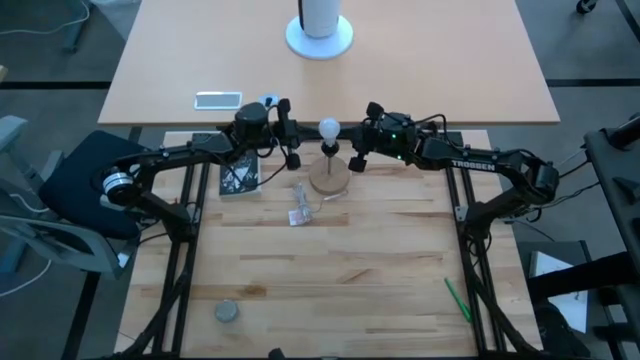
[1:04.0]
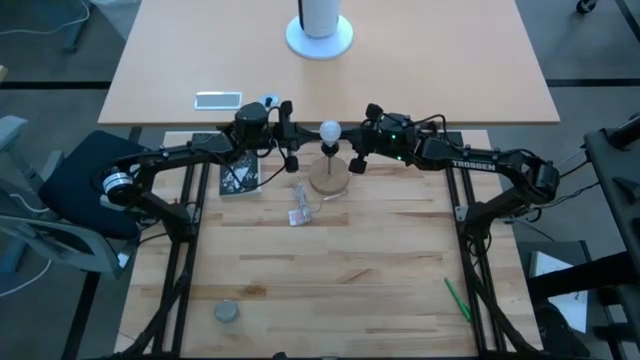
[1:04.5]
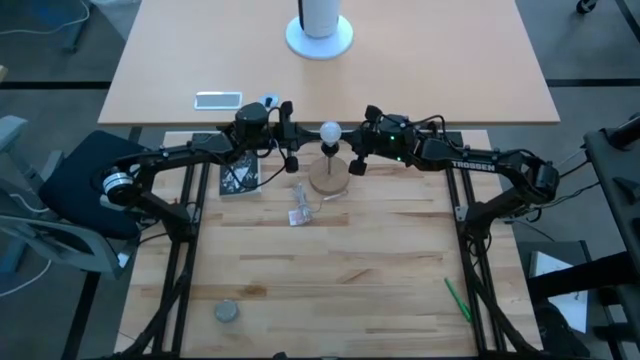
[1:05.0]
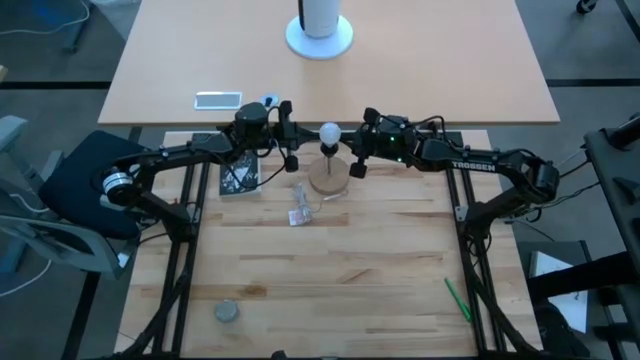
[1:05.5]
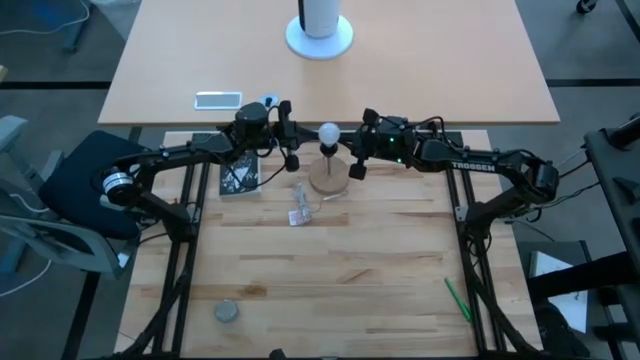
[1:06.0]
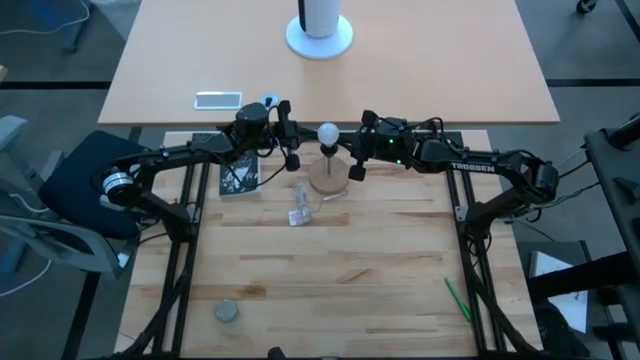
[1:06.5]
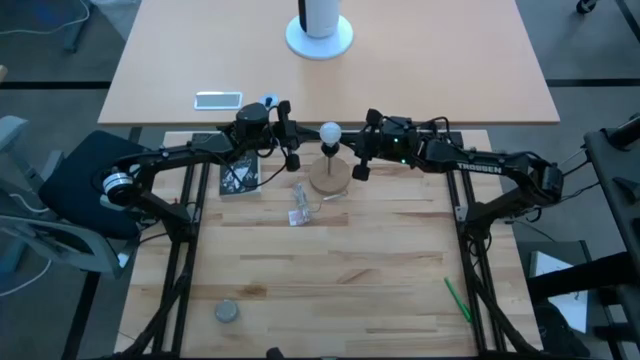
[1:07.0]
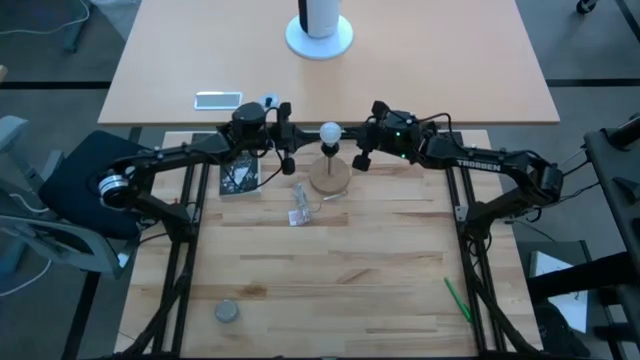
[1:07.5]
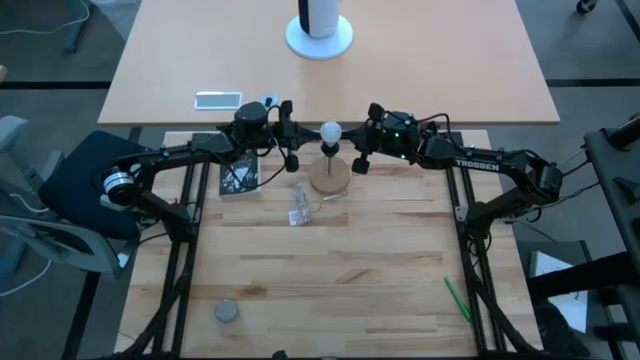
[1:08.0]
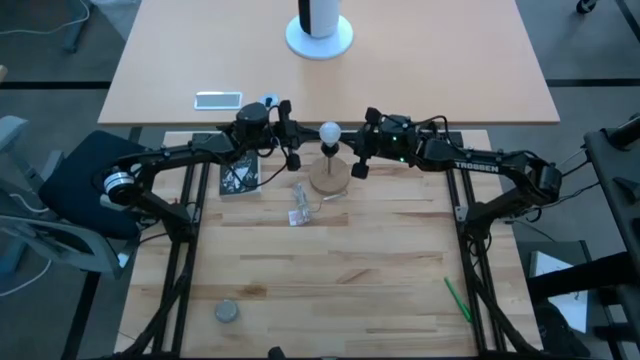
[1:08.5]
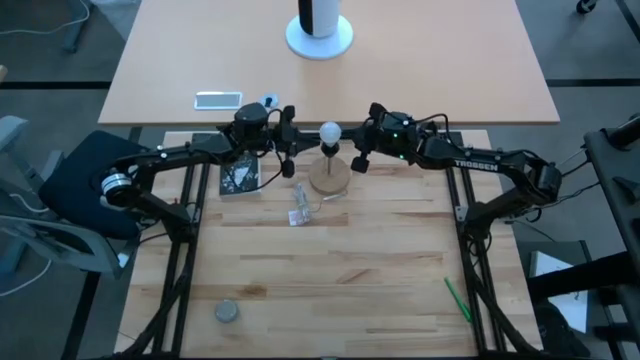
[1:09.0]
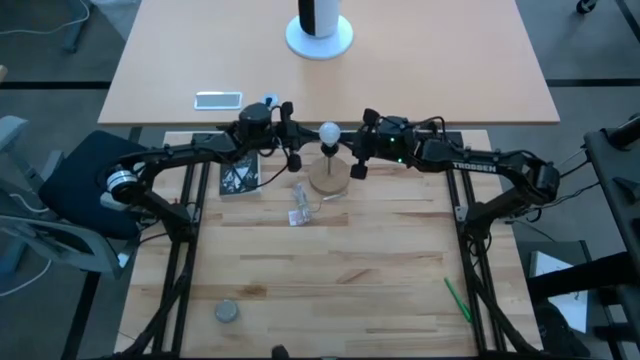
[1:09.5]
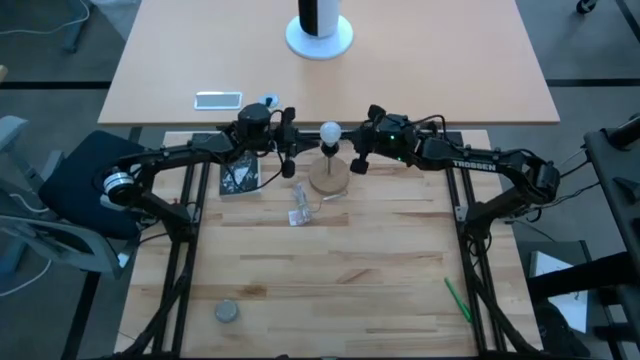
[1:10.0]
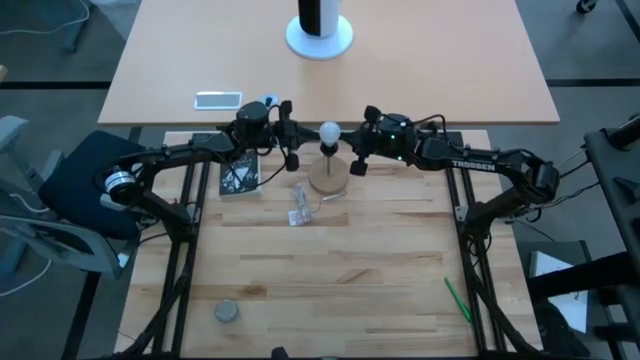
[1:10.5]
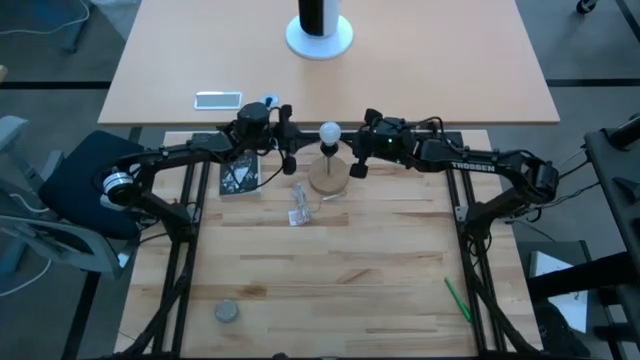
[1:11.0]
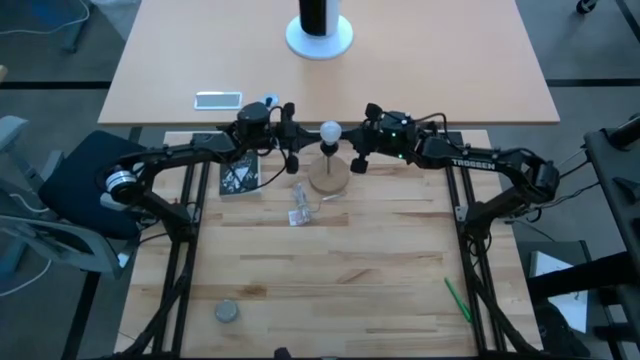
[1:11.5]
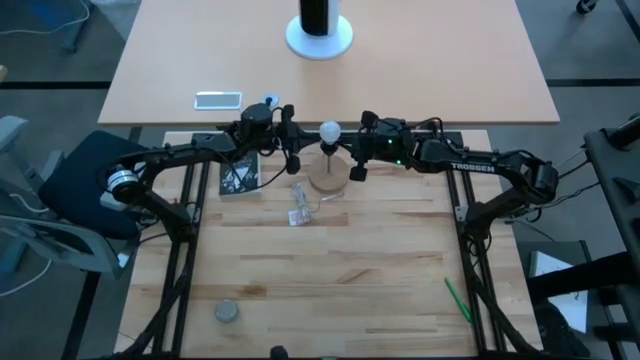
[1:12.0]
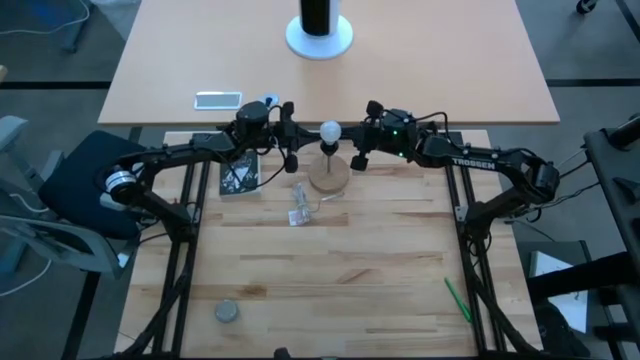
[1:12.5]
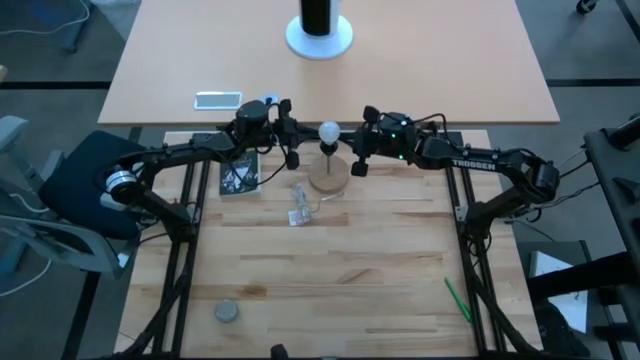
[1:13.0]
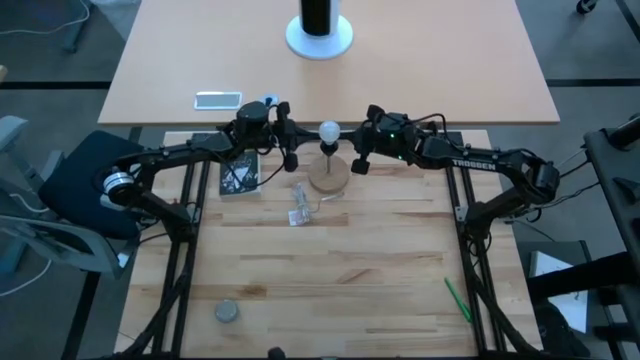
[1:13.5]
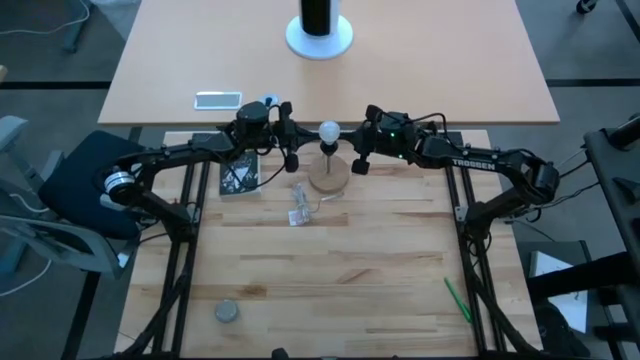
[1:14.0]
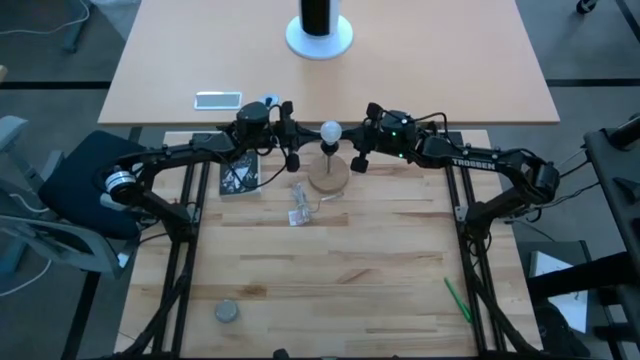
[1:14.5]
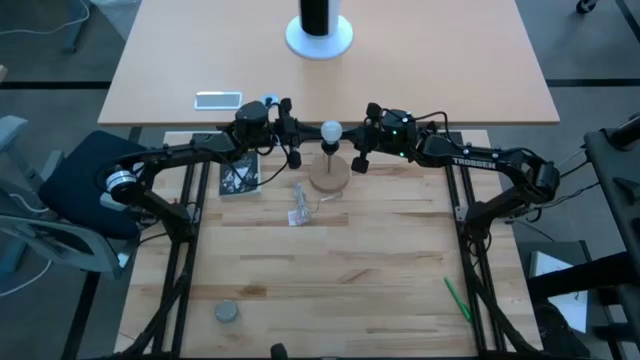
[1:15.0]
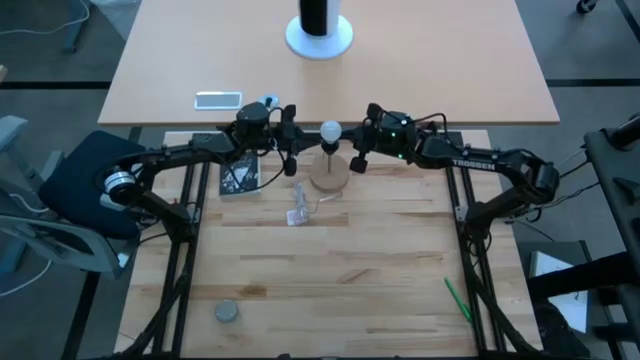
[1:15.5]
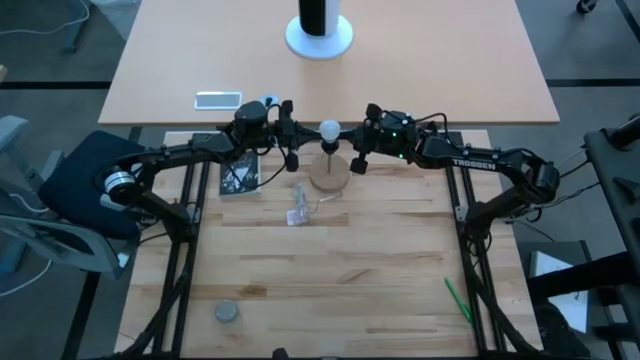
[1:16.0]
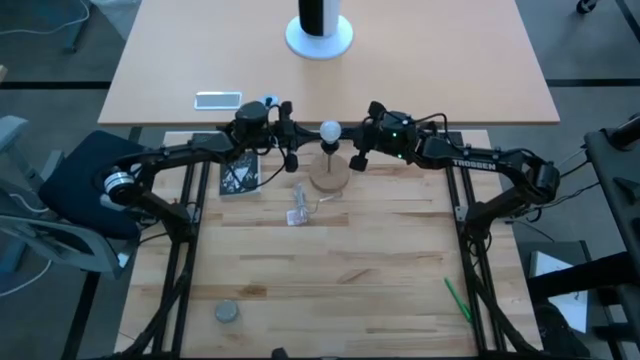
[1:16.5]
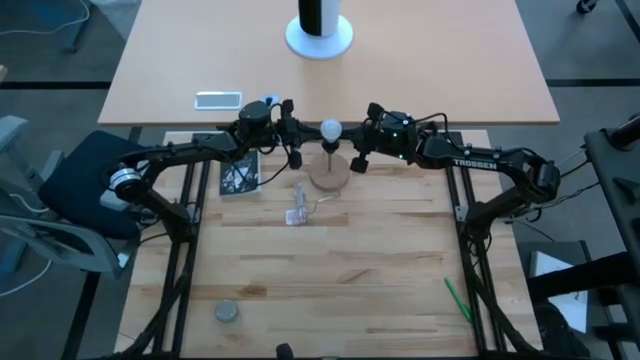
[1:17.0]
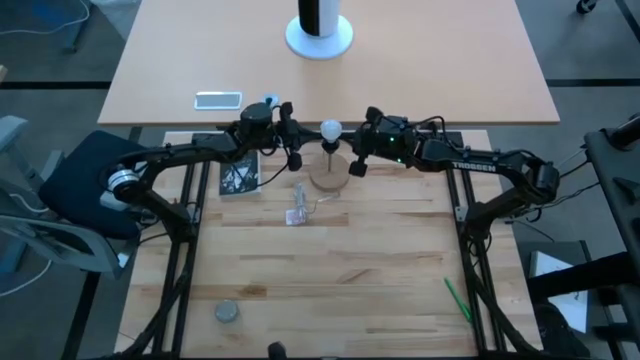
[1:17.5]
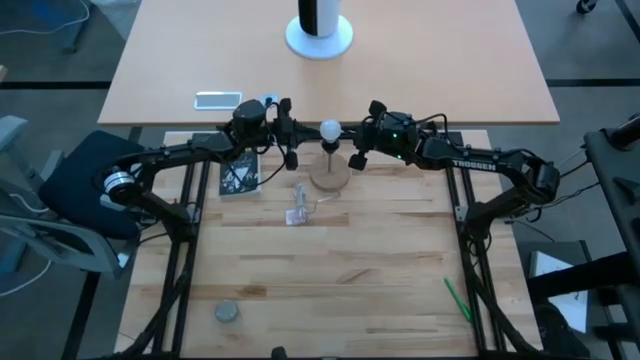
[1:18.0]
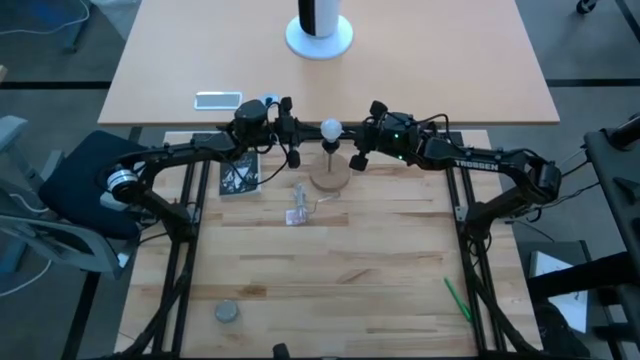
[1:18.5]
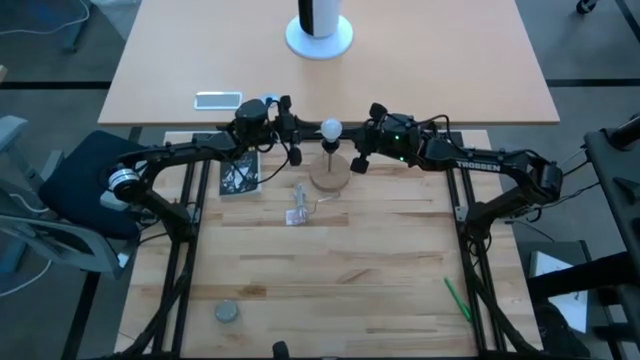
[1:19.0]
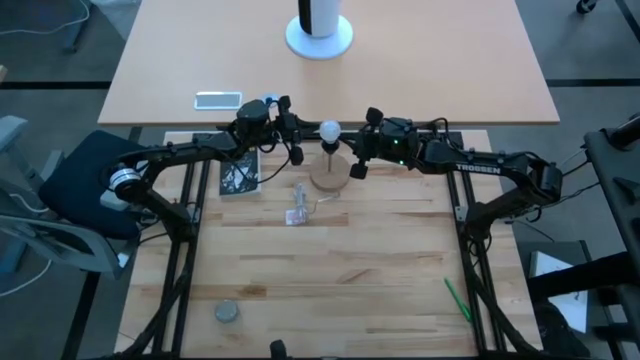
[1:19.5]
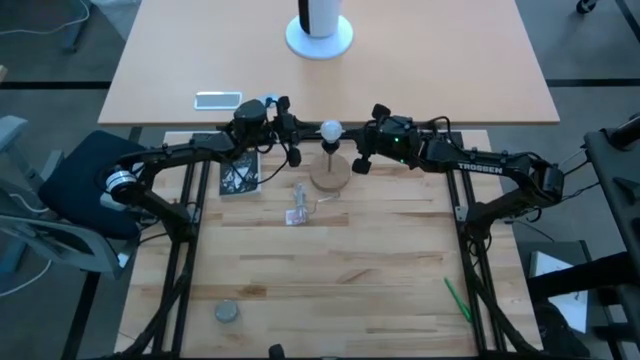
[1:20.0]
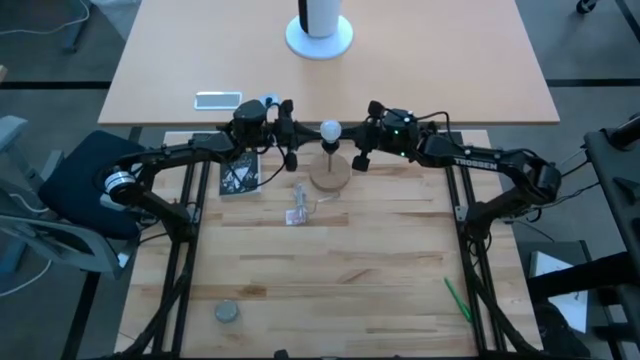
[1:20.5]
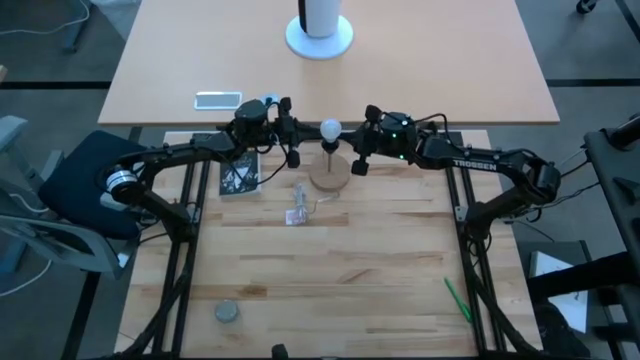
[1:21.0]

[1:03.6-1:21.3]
Task: Screw lightbulb
Insert the lightbulb into the black lamp
